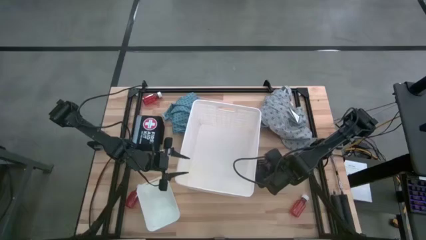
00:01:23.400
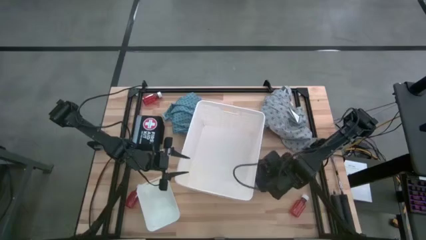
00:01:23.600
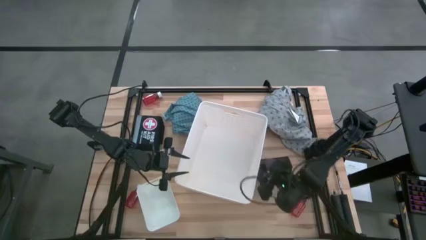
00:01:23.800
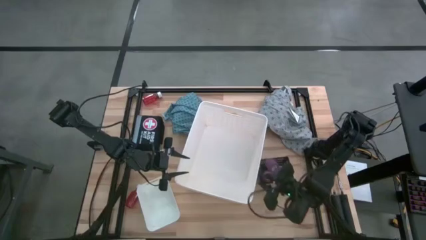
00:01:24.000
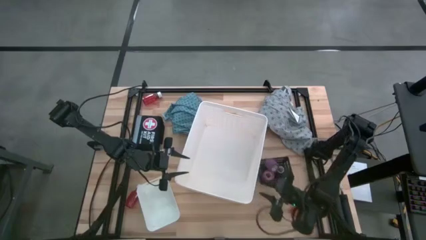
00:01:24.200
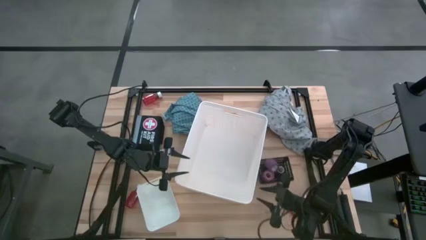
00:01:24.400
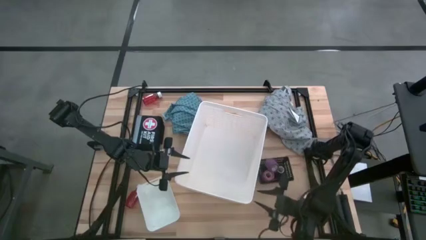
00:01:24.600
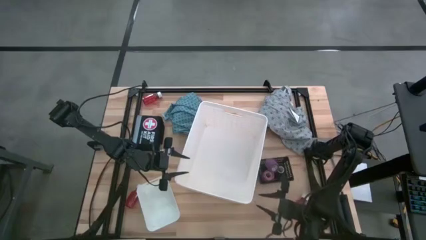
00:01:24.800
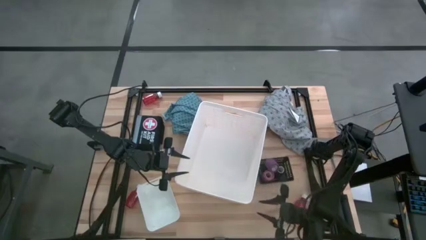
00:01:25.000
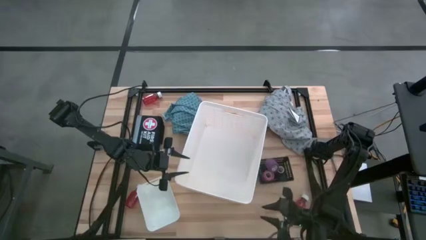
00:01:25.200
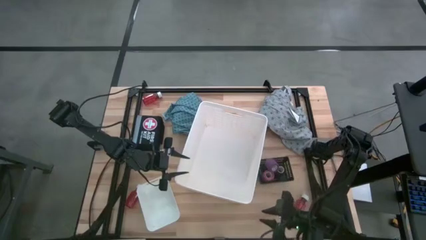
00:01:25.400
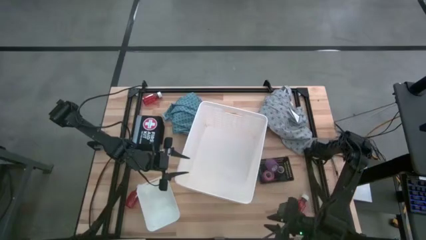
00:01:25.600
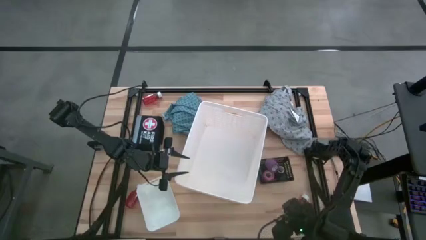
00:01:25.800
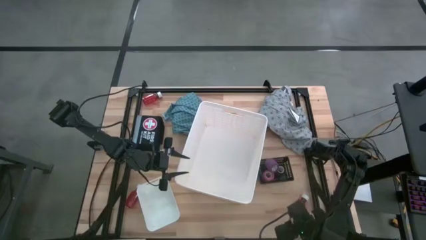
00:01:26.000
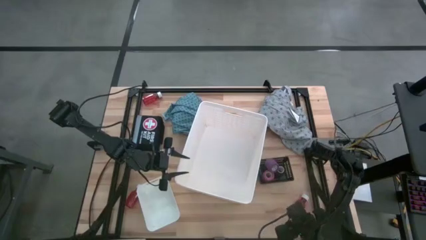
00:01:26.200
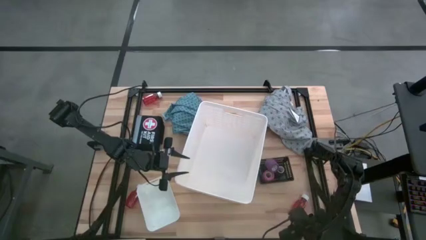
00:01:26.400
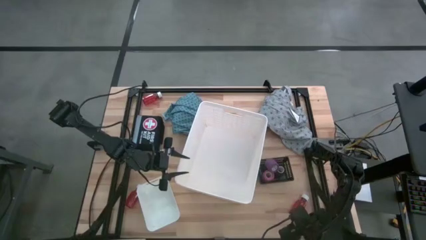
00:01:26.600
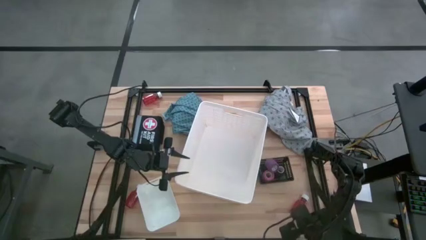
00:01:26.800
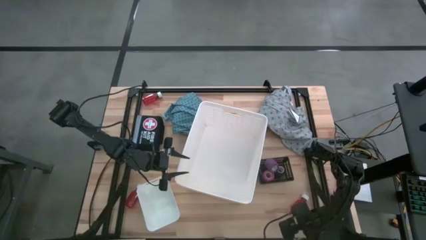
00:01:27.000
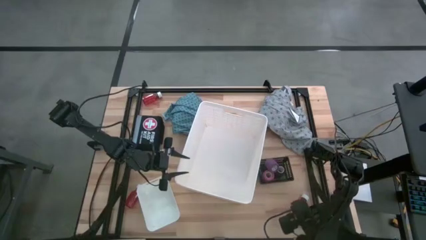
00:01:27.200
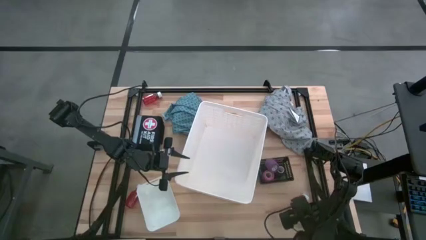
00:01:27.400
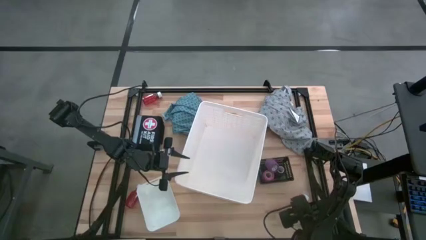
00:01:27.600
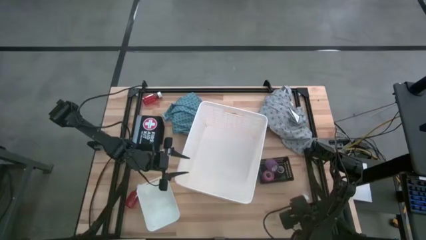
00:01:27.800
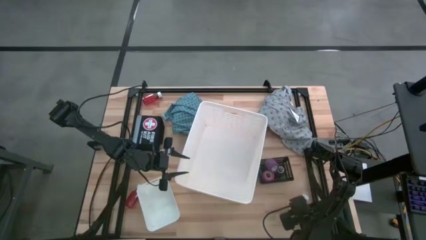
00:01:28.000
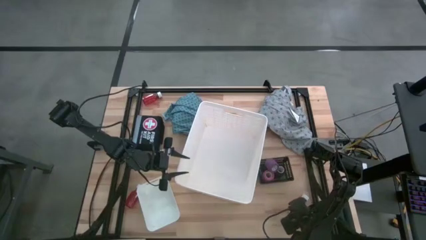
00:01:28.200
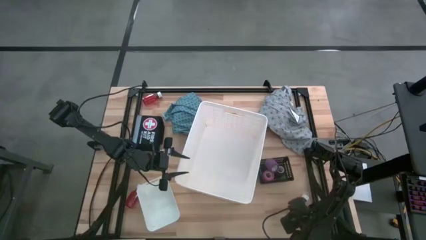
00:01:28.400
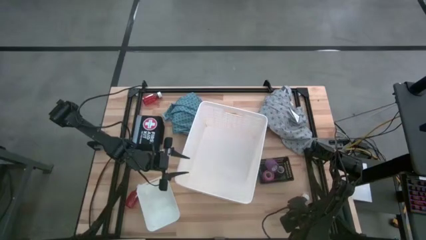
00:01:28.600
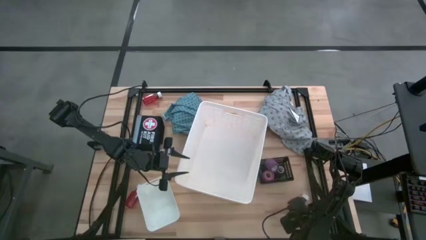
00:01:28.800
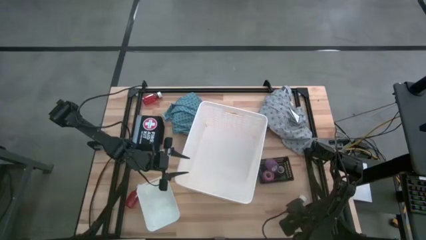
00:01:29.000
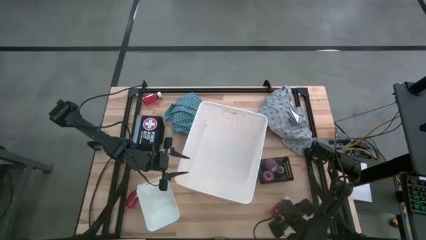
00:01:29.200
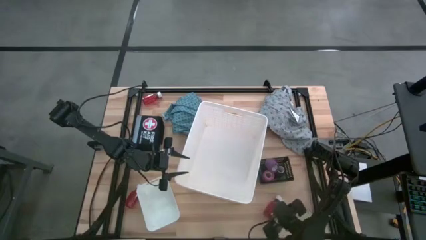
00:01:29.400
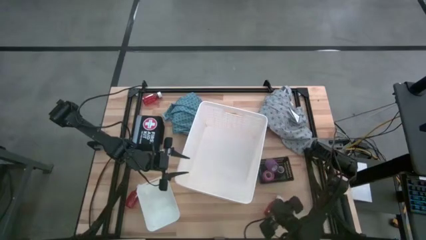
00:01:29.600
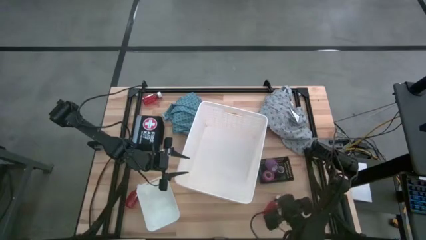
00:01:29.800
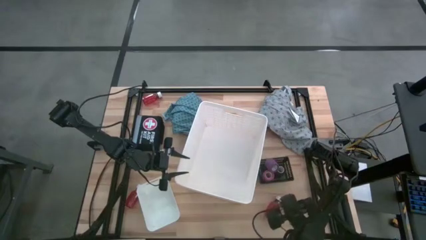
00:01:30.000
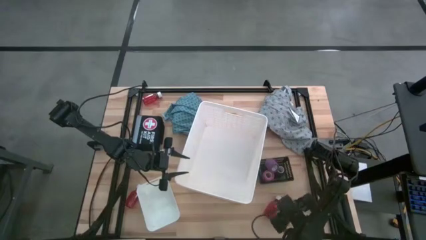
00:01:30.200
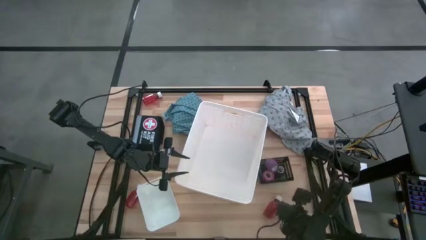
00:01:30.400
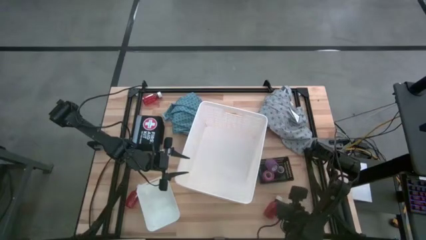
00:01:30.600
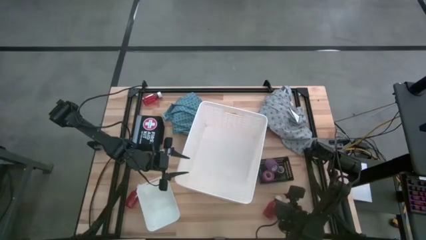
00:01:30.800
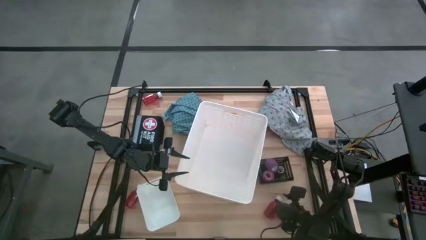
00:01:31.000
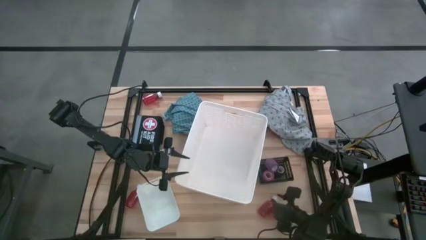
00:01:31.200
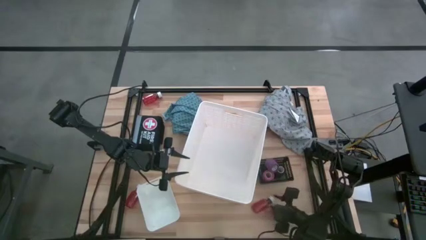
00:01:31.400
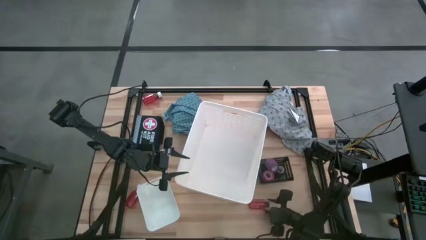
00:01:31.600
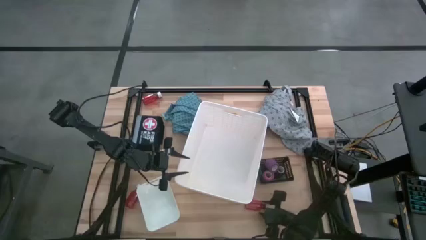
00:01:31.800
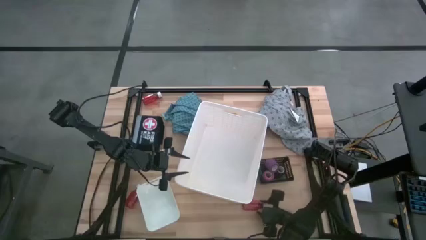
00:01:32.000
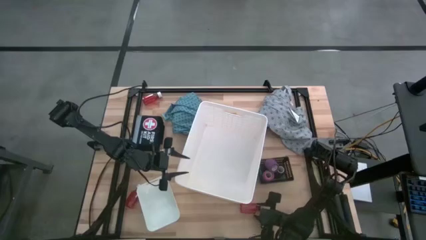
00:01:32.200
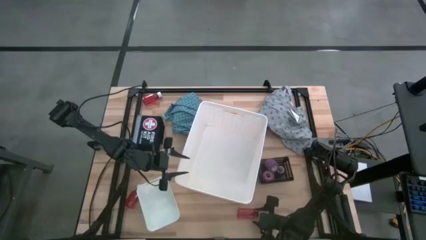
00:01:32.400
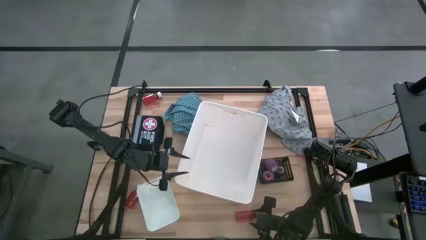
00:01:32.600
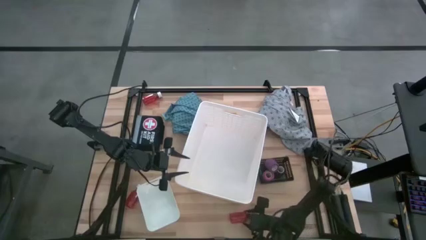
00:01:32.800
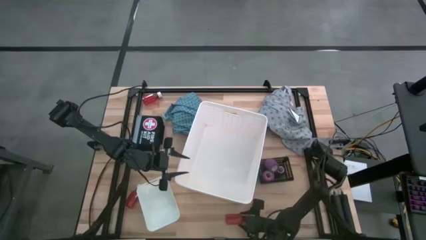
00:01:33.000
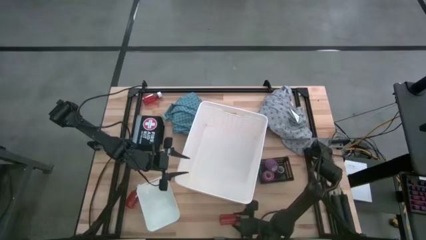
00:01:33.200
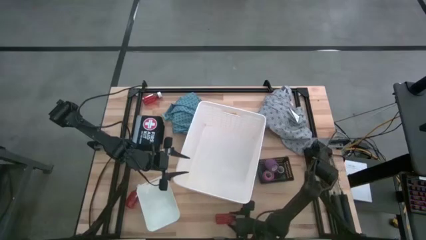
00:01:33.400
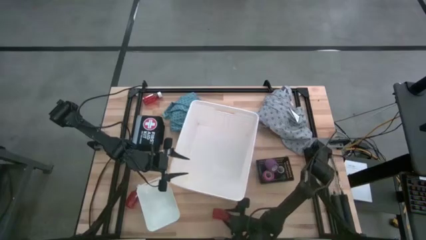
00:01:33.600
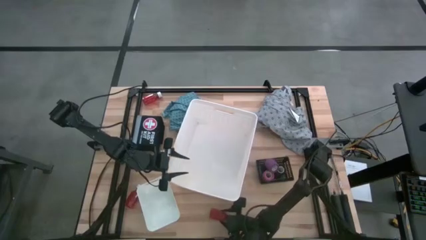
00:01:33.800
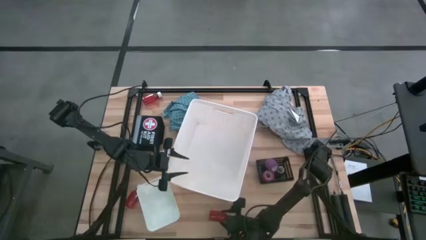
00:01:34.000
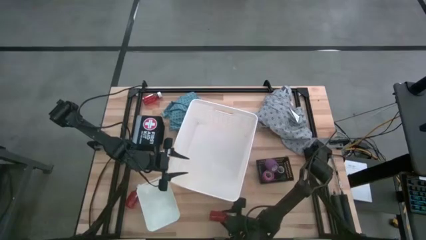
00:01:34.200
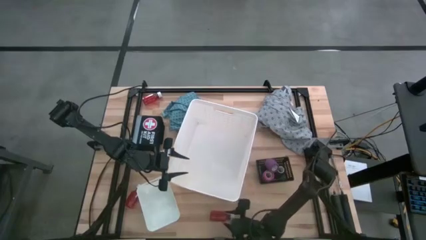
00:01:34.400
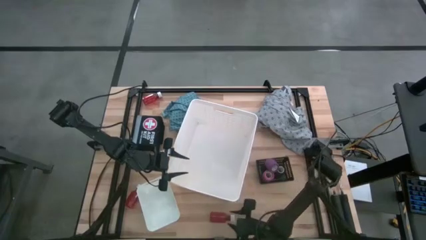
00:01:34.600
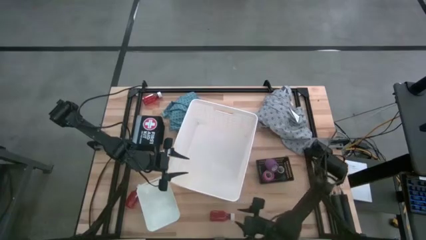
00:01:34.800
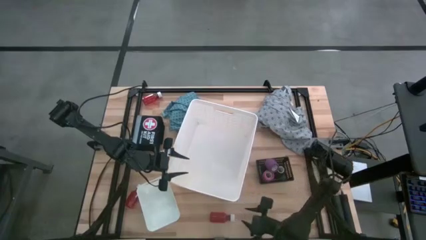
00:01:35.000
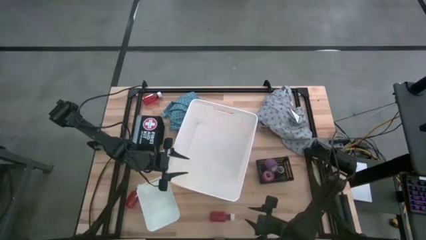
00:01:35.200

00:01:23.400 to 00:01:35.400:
Task: Pick & place medical supplies in basket/bin
Put the bottom right orange bottle into the white bin
